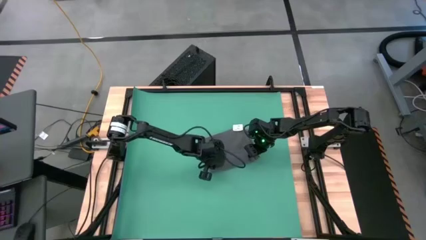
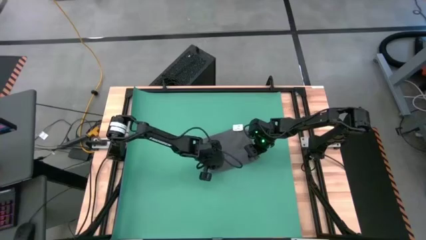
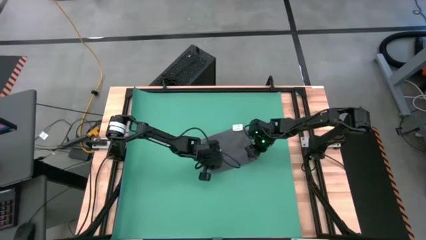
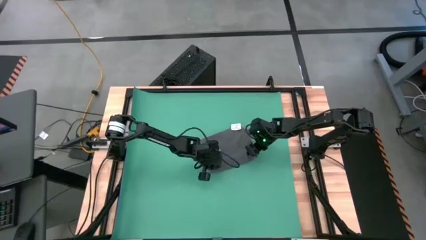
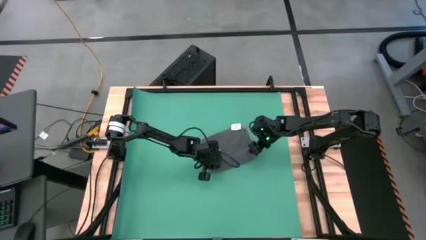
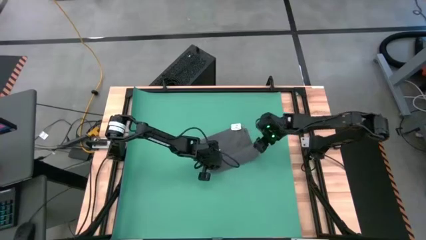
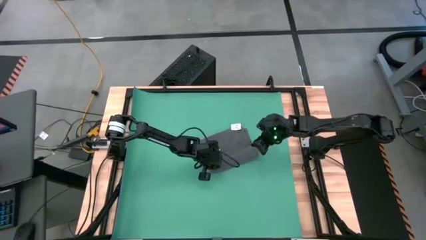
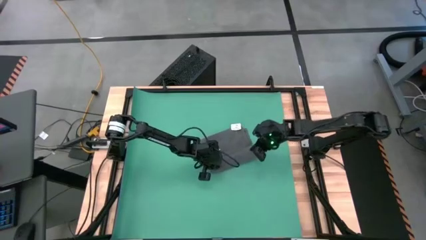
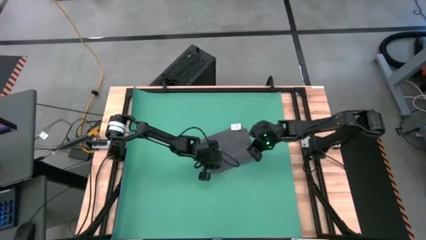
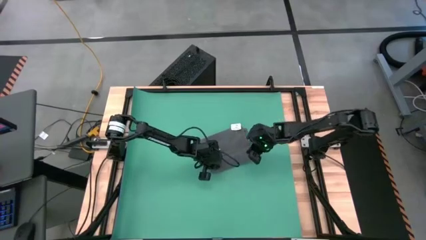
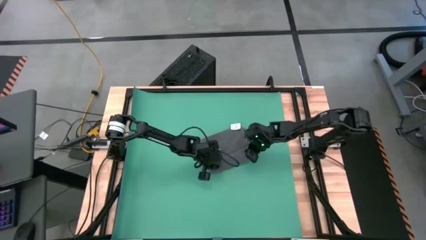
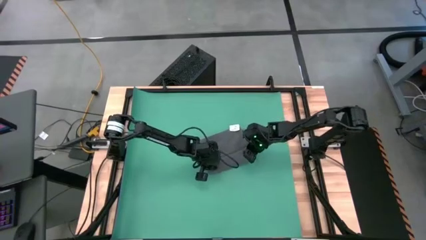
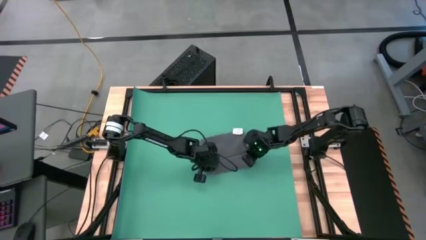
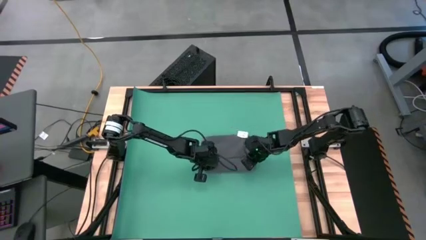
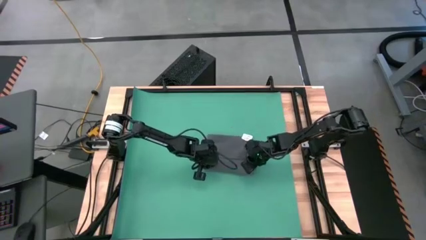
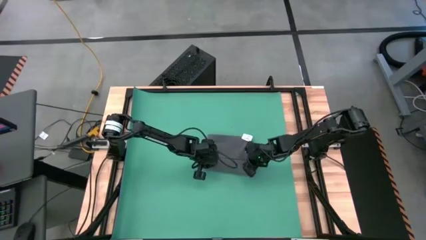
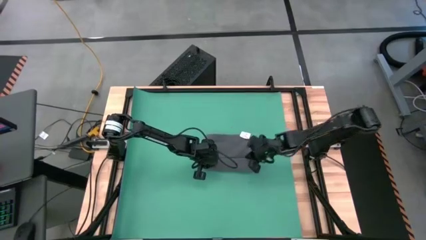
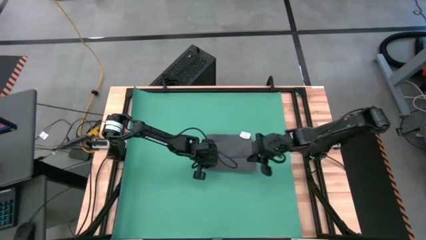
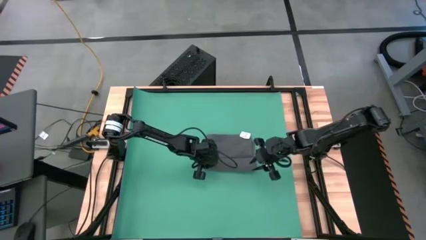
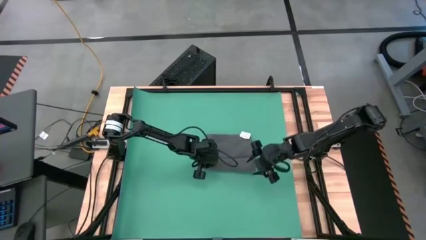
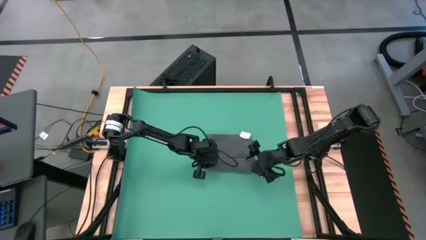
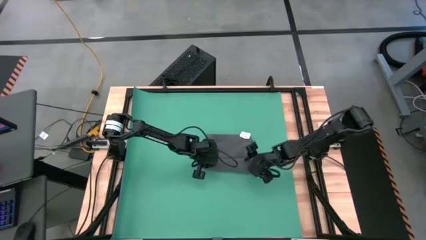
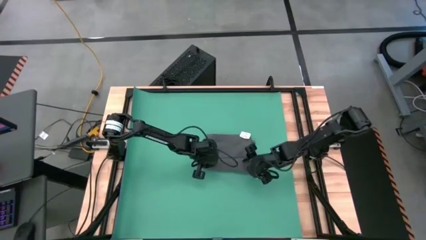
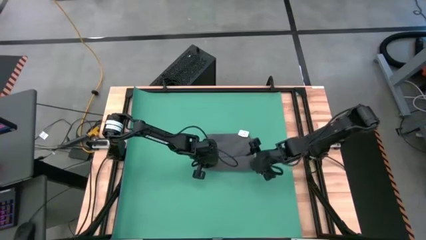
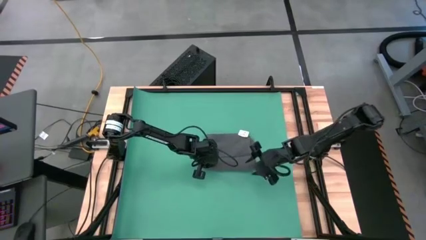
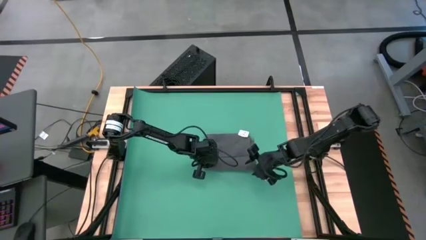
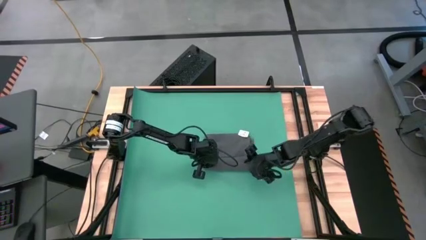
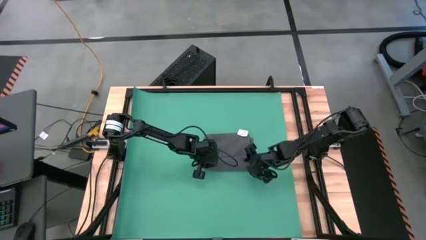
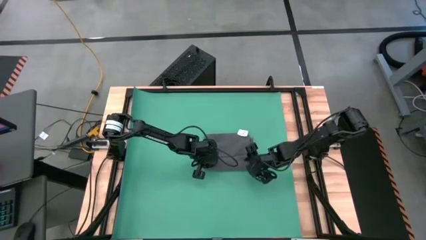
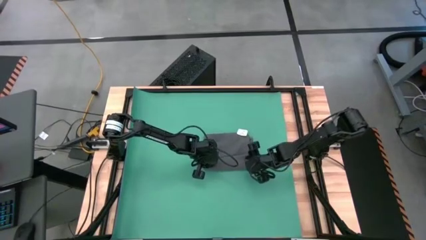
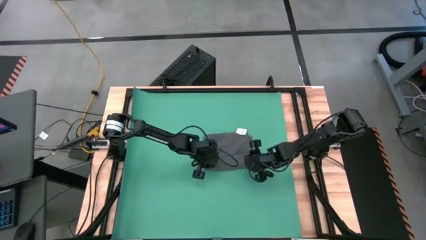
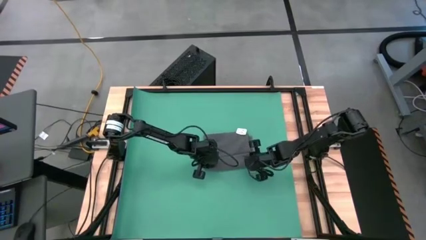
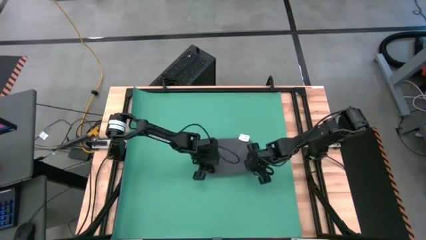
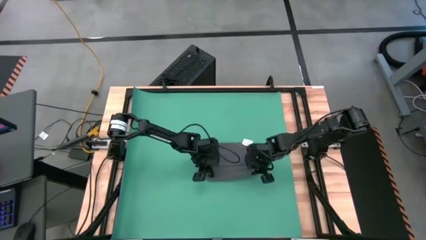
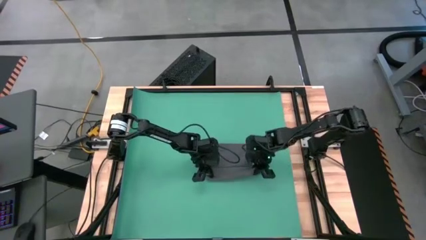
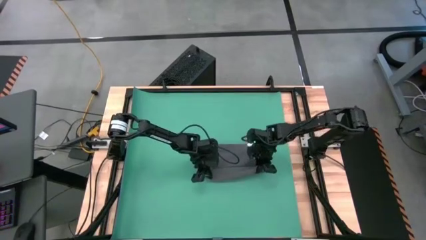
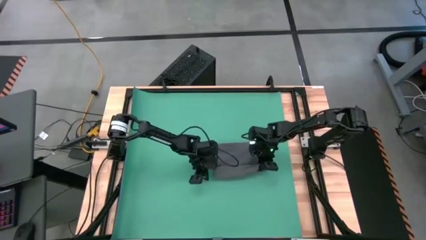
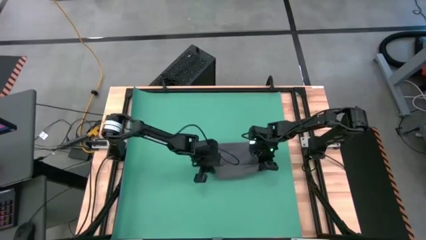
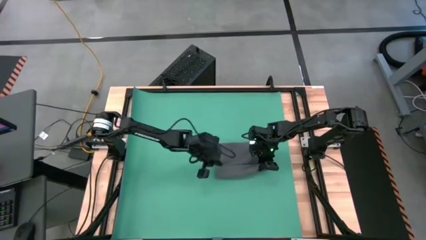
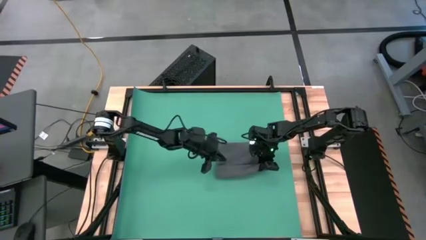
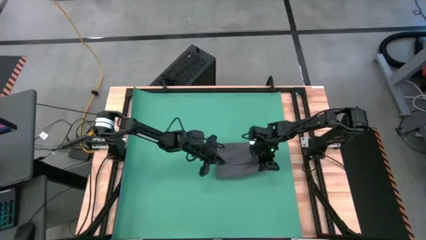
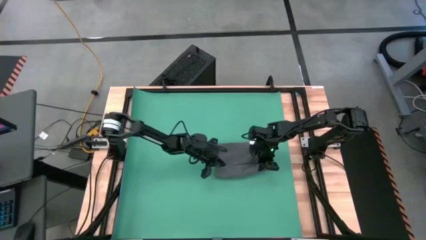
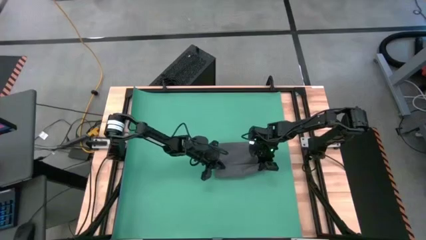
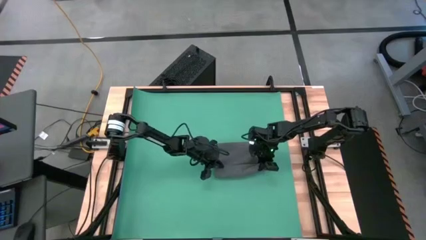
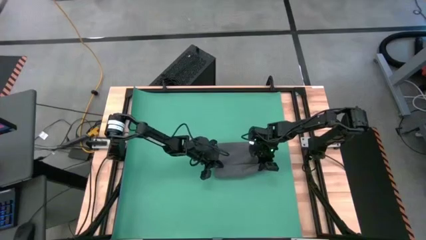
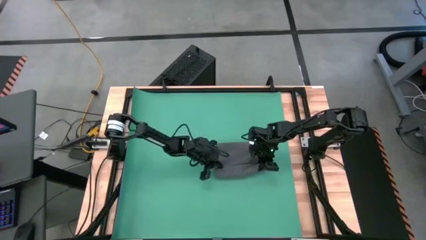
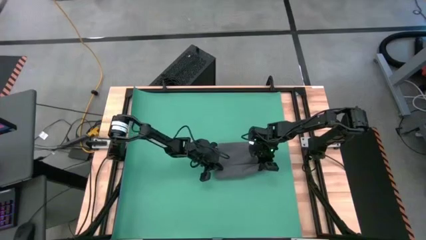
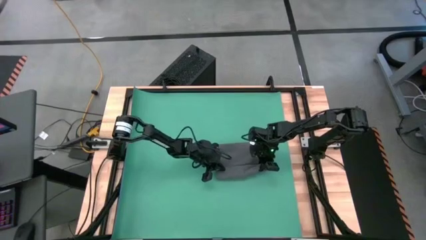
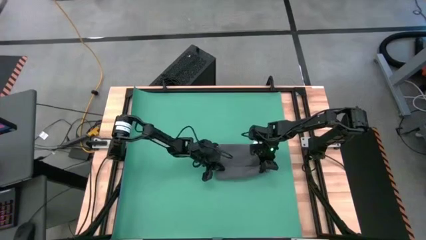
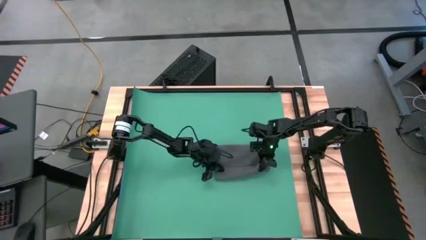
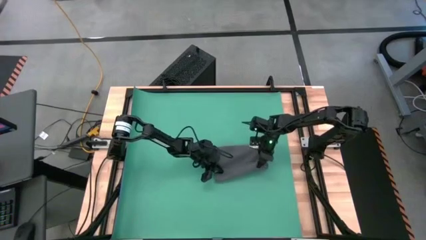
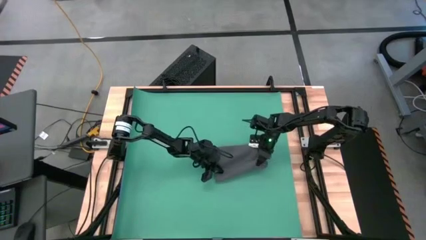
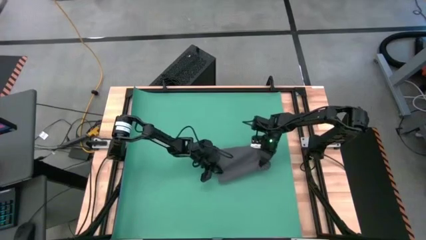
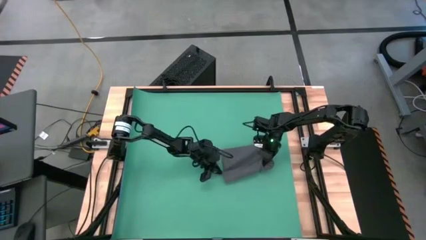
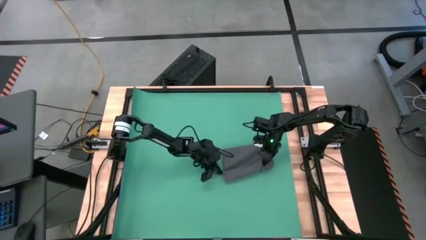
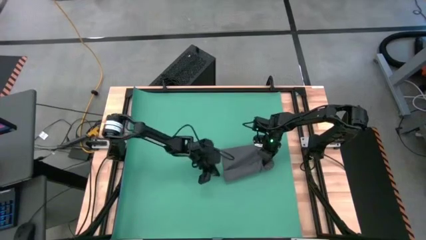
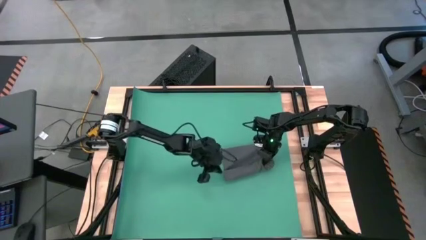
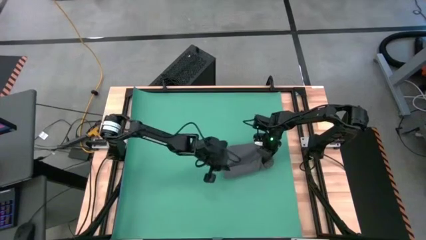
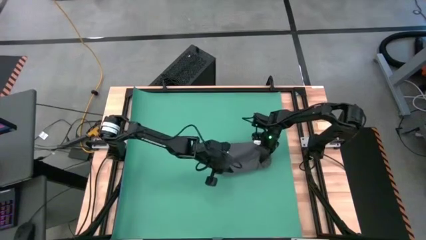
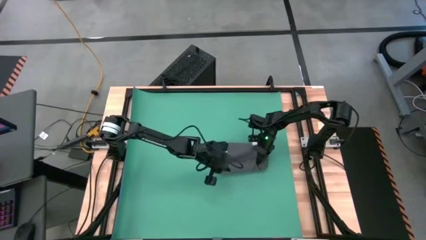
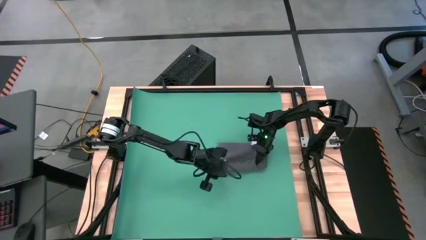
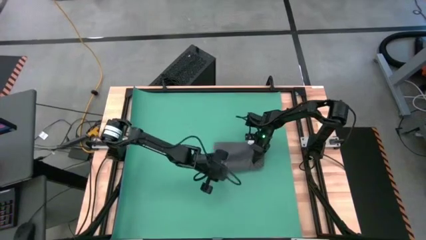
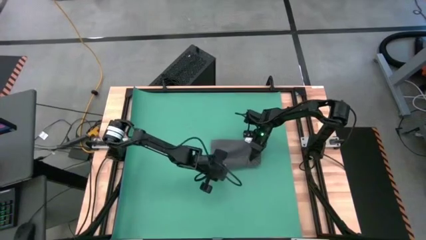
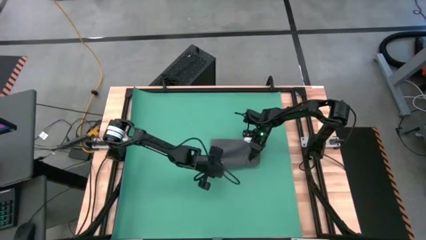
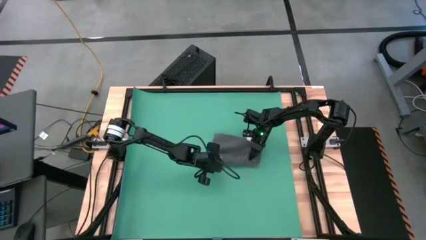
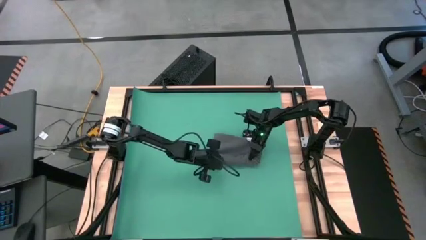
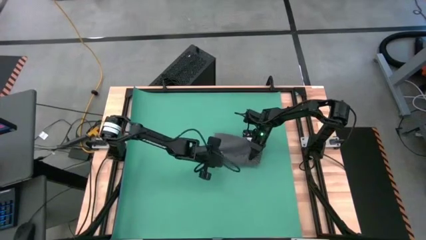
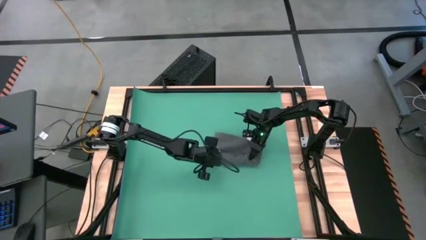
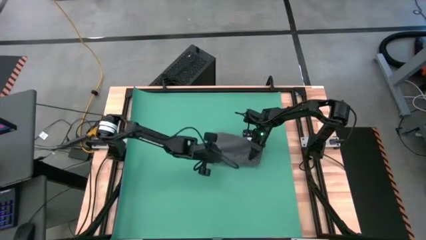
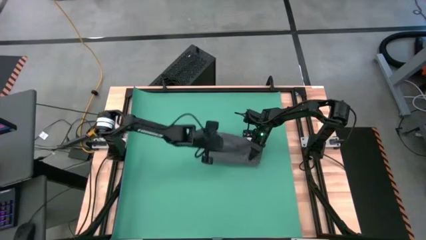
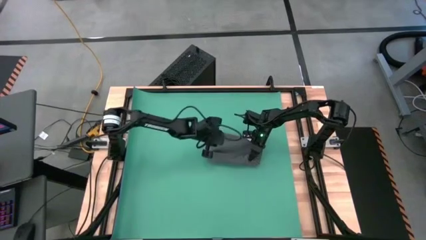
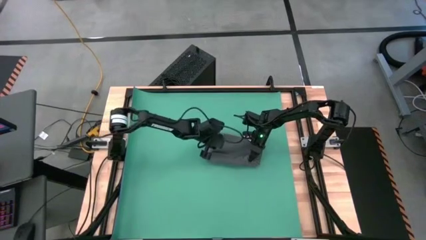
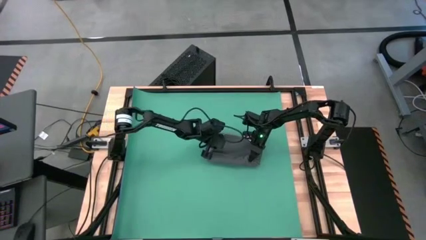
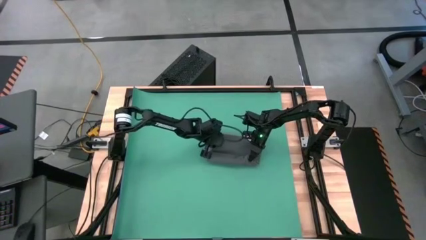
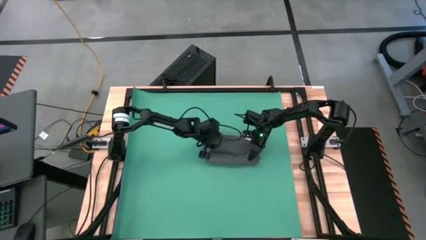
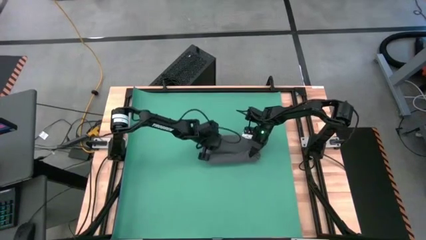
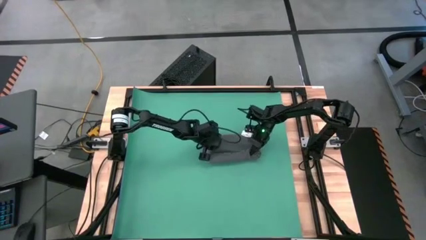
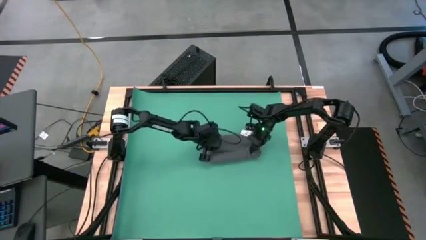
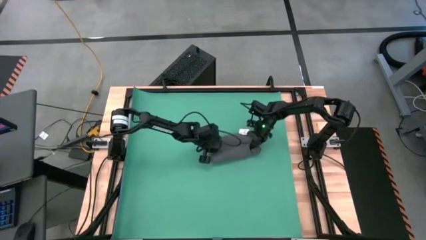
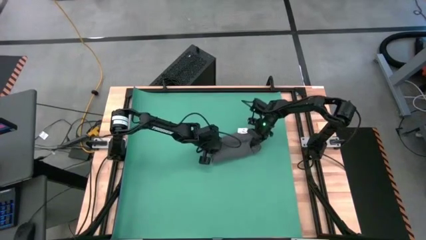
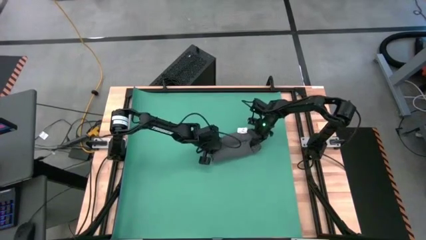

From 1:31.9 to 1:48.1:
Task: Roll towel
Roll the gray towel
